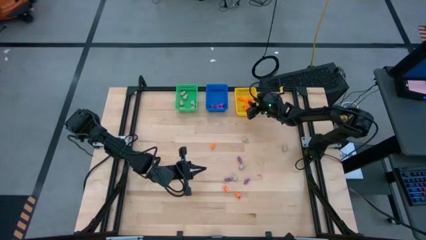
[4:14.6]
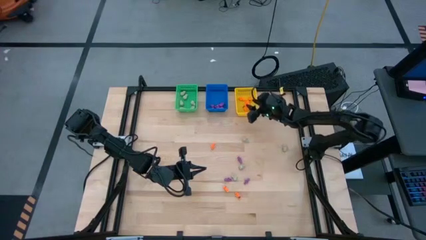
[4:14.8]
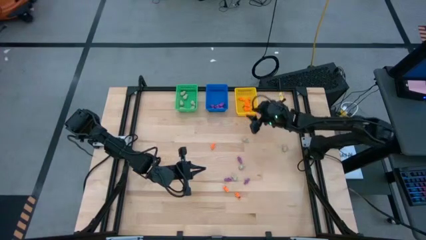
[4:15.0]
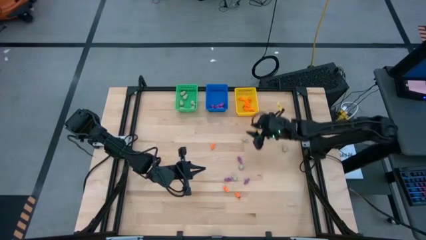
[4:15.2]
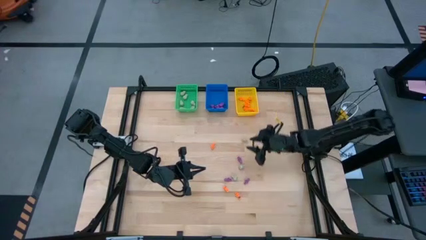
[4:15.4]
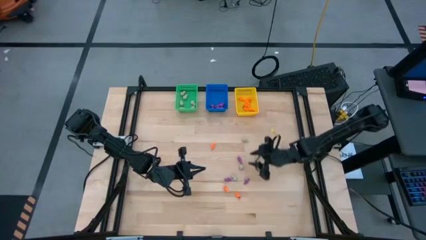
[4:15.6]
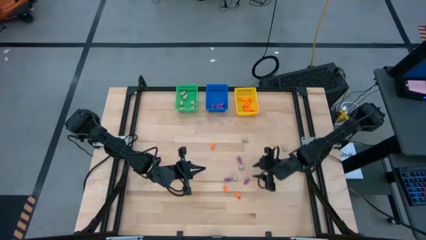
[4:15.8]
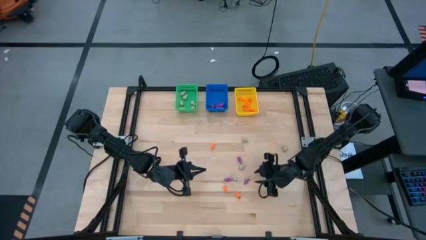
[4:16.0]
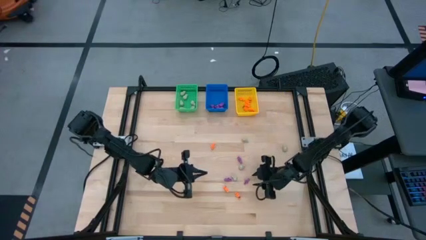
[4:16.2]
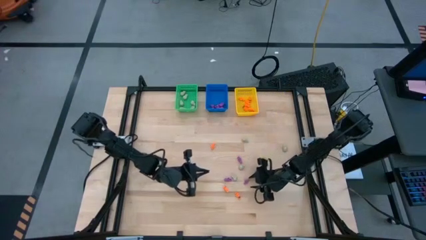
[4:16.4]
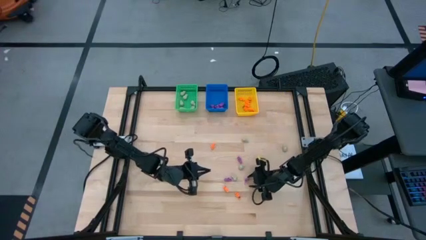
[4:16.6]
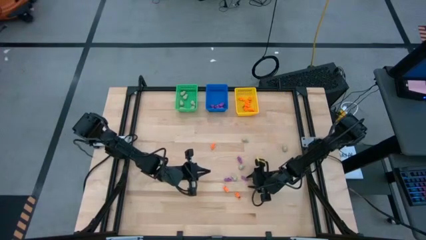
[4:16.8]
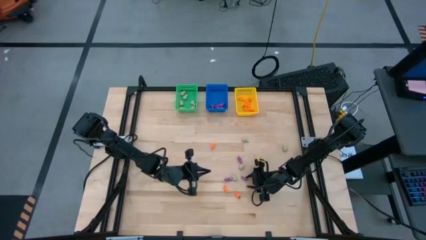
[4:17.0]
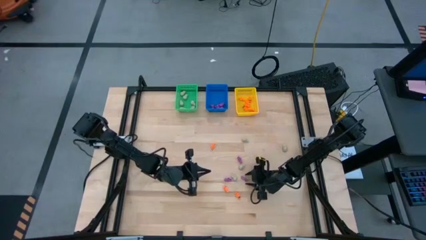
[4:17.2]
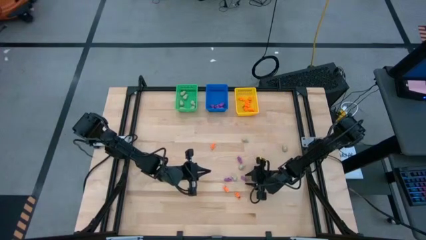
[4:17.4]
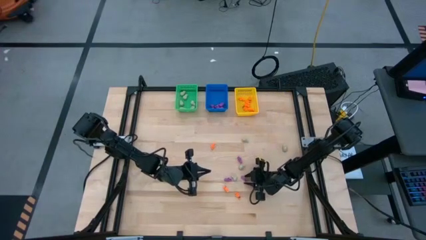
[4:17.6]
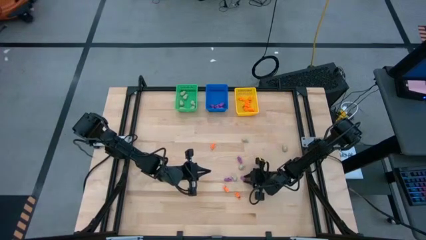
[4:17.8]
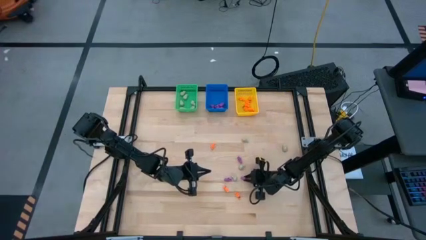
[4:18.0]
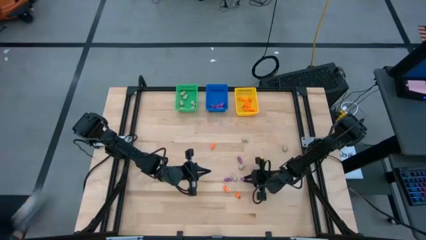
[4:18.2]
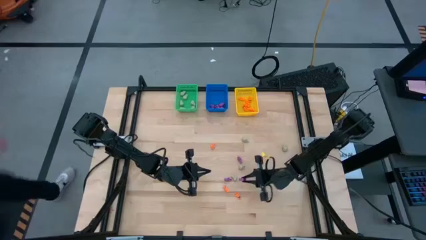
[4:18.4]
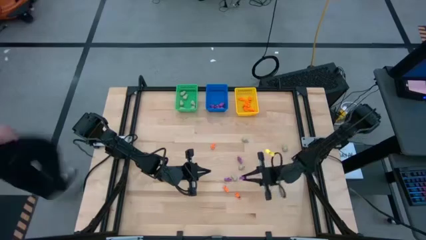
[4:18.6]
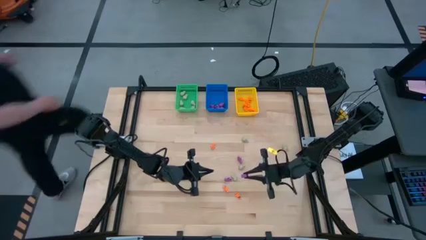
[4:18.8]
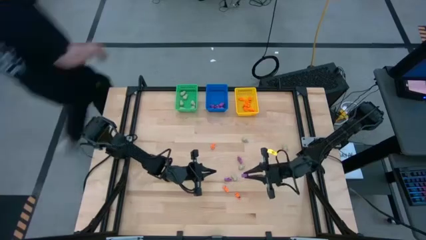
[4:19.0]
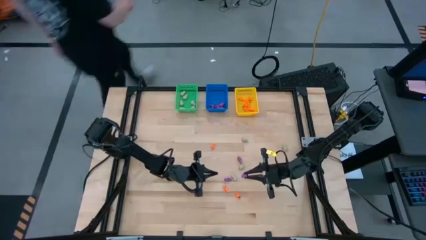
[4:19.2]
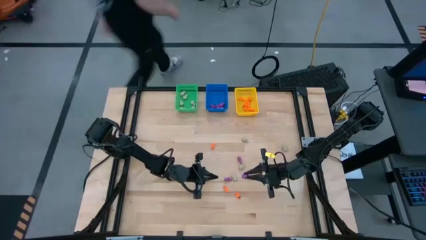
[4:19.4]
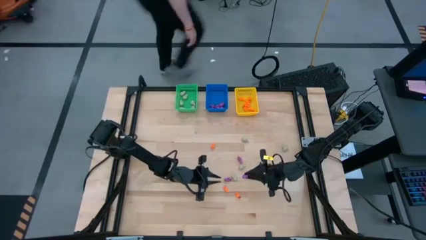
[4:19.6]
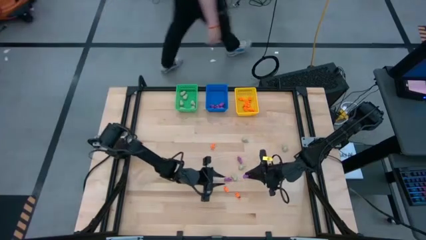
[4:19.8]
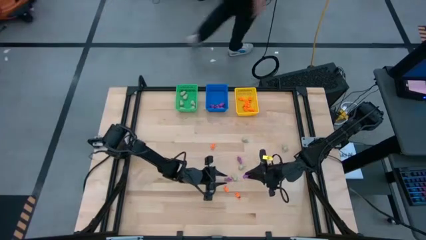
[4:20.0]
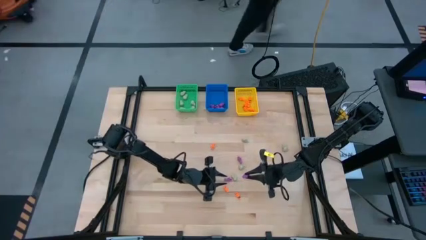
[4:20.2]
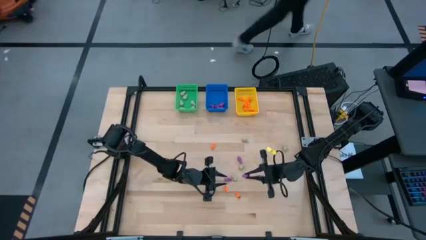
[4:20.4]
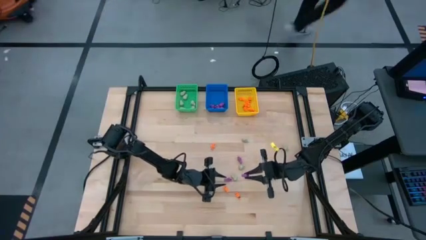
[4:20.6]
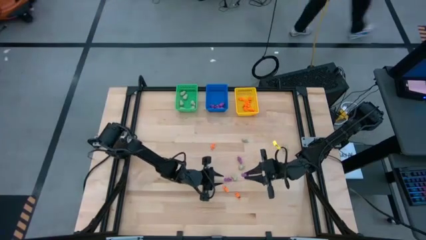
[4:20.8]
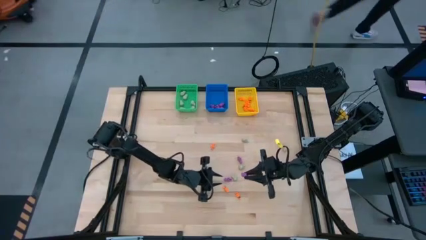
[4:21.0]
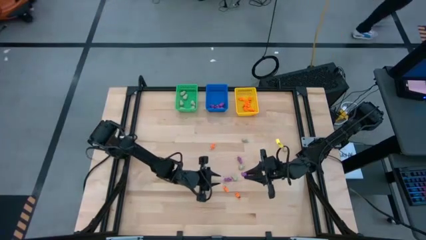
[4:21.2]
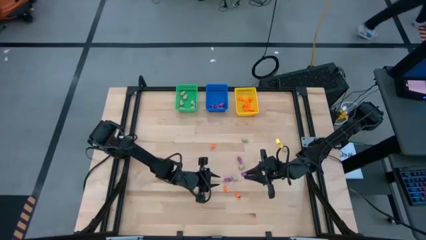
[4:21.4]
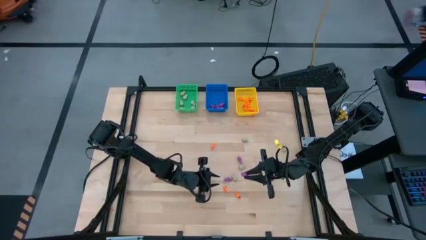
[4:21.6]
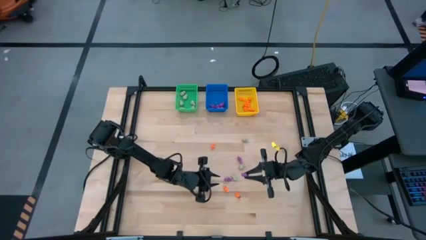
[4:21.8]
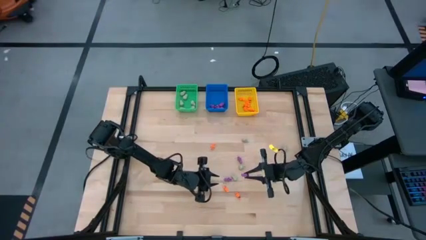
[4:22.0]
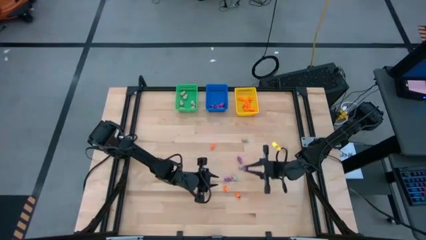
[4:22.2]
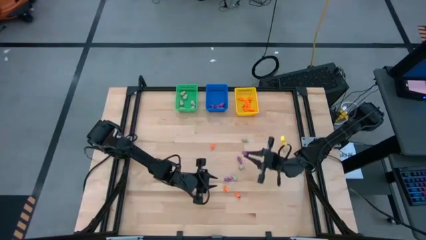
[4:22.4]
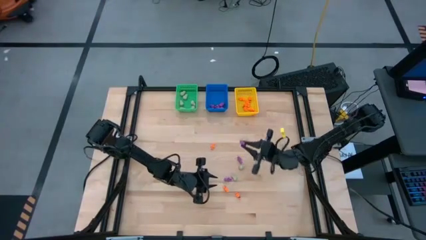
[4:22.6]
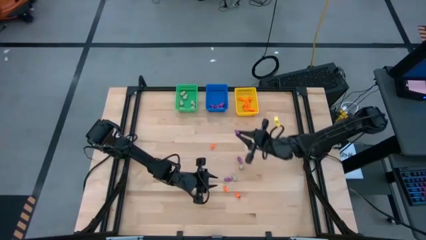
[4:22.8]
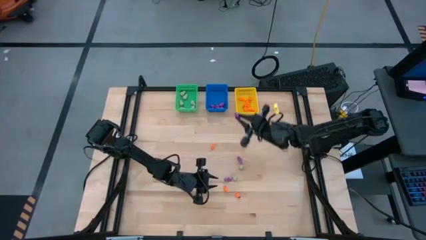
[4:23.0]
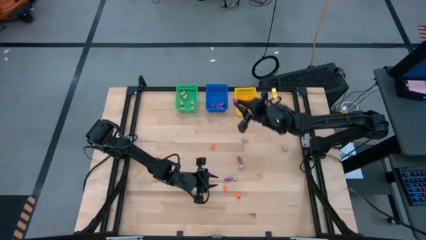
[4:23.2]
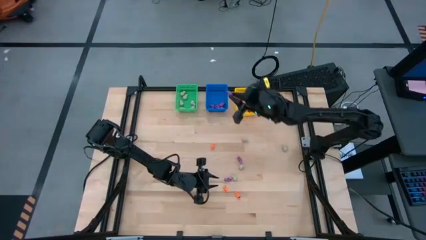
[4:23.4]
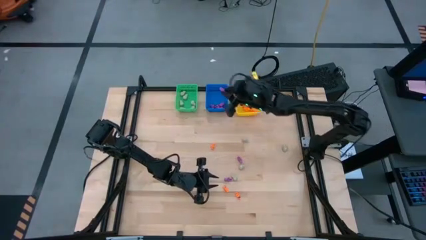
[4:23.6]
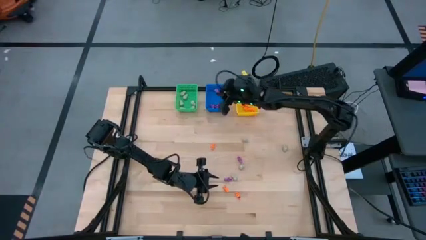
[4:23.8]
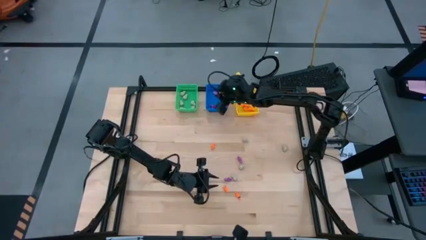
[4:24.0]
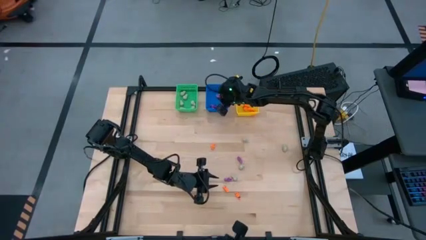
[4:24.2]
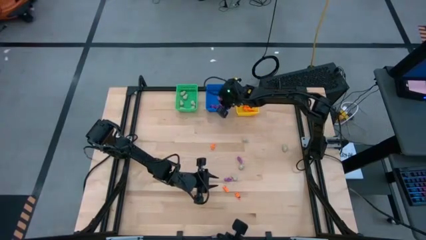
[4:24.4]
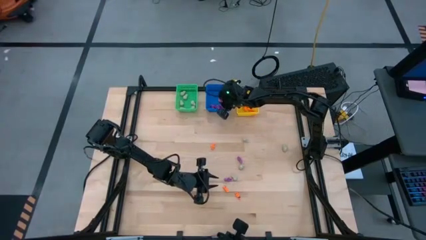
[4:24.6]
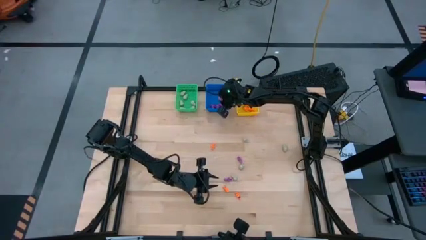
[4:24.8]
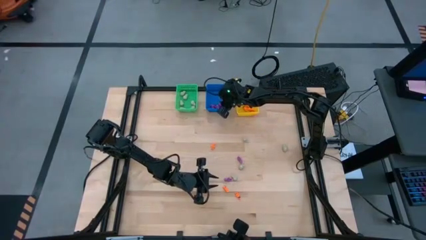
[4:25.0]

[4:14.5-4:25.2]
Task: Sort Halloween decoration
Put the purple skeleton toy into the blue bin

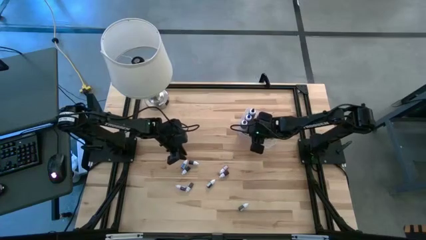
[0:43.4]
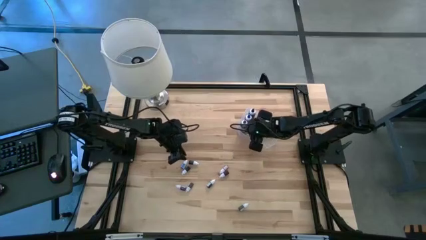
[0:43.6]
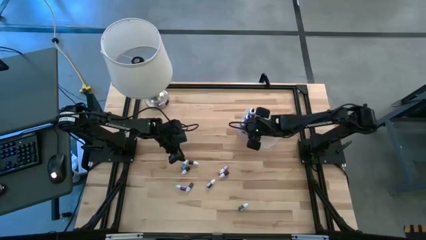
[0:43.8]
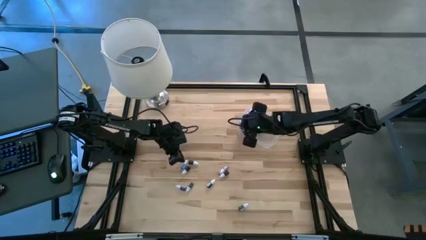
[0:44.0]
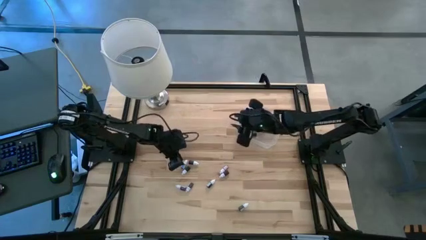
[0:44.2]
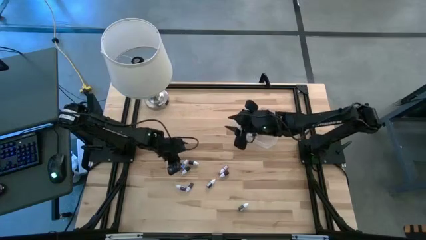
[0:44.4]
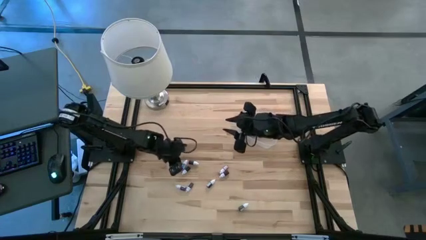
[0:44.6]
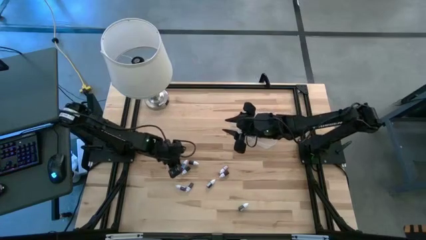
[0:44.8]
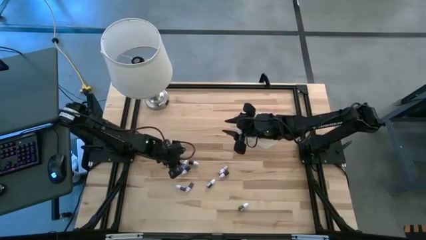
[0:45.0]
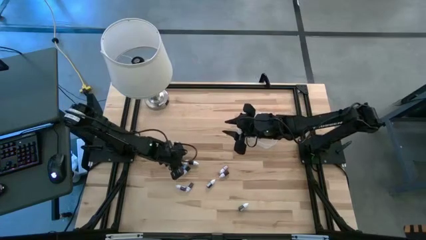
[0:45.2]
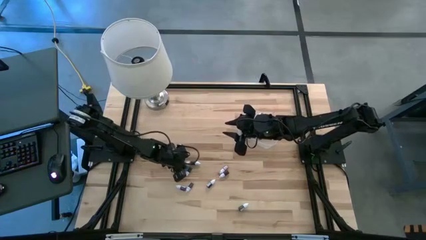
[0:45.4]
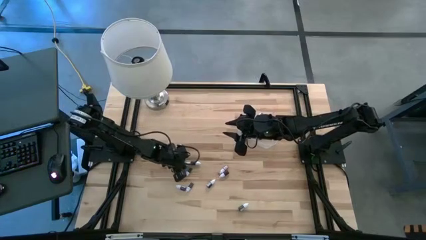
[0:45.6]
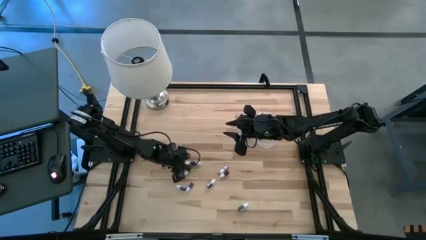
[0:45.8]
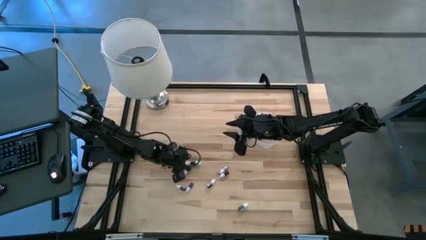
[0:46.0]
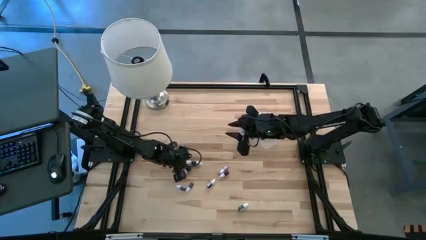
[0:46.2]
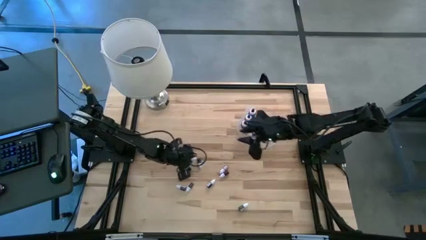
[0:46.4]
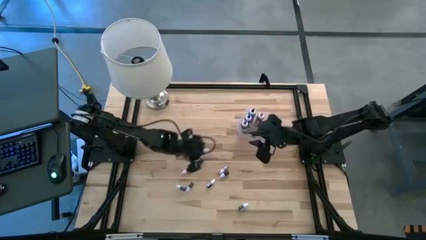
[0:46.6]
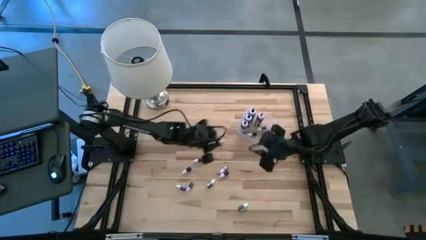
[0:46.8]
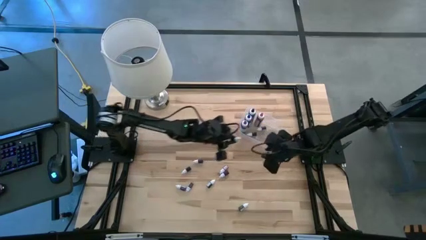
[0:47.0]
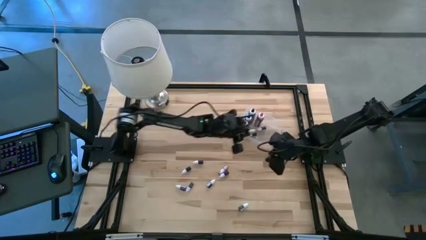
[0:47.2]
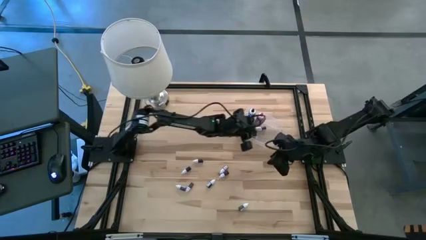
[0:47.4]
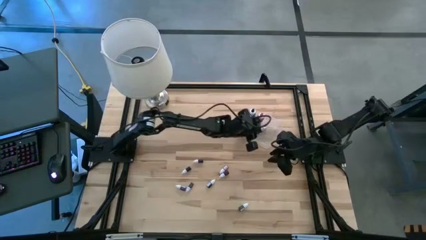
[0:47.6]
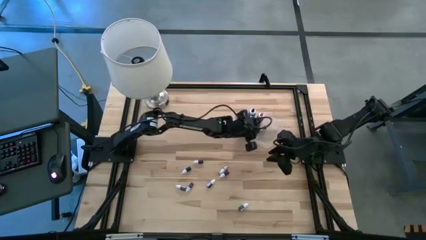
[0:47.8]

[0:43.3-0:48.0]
Task: Pick & Place food coloring
Put the small blue food coloring bottle into the transparent bin
